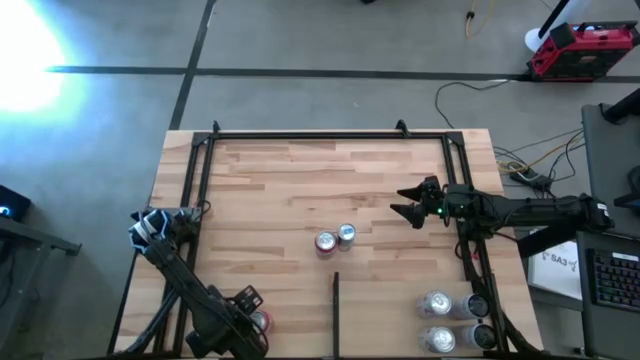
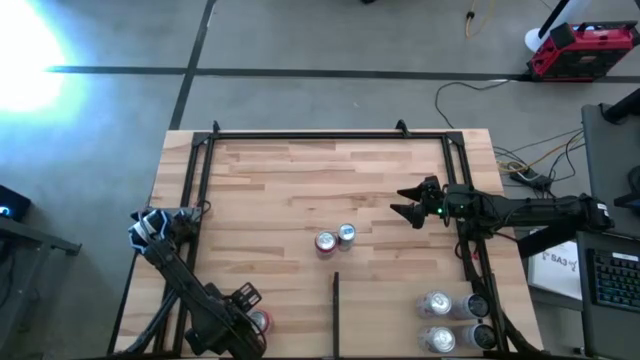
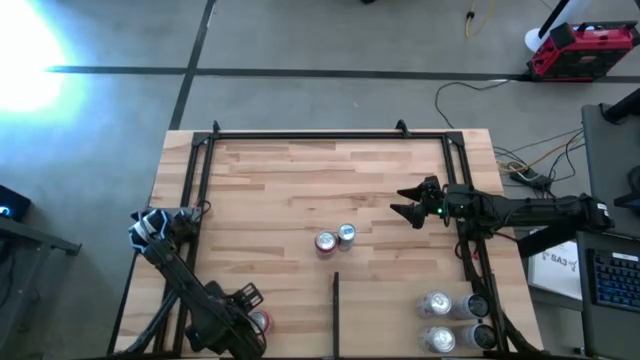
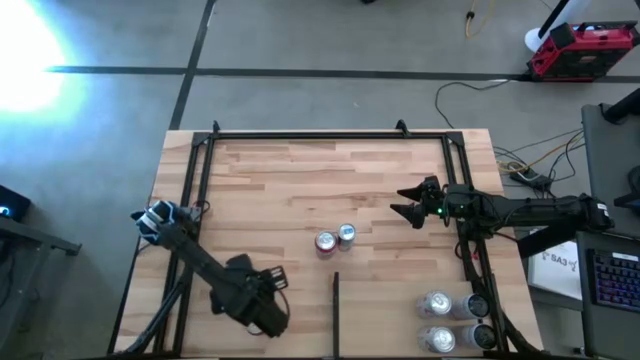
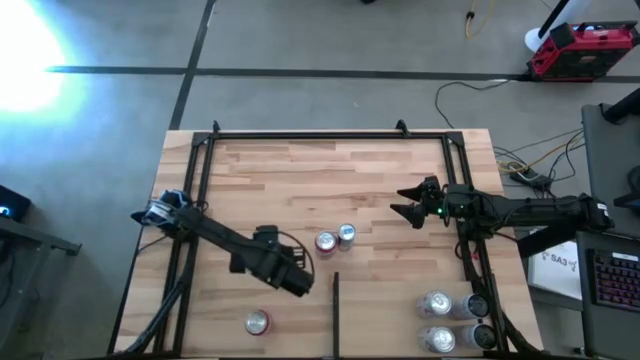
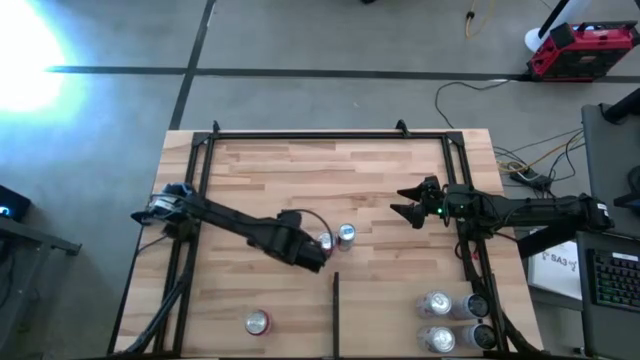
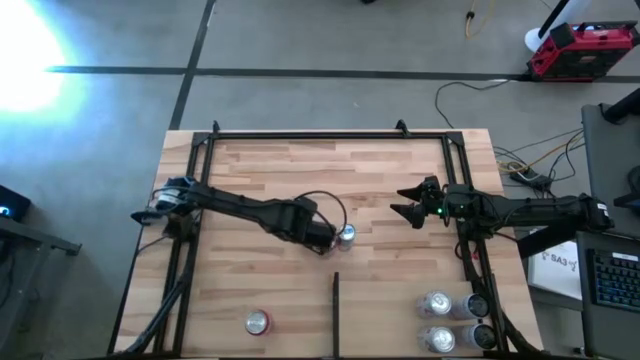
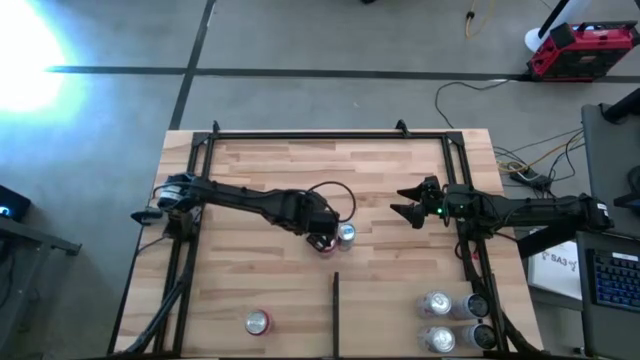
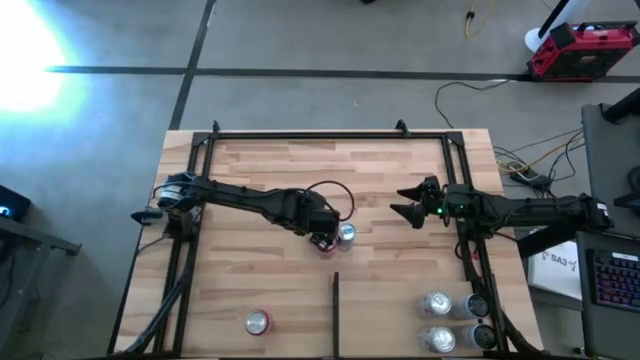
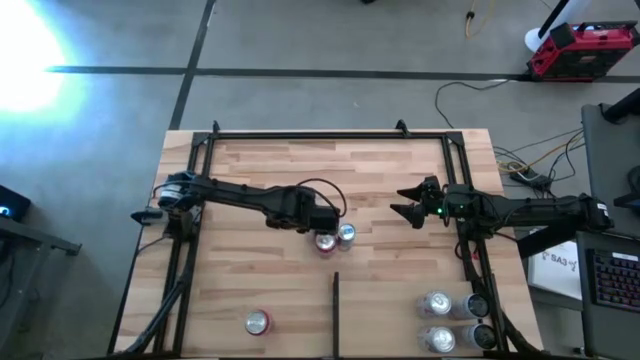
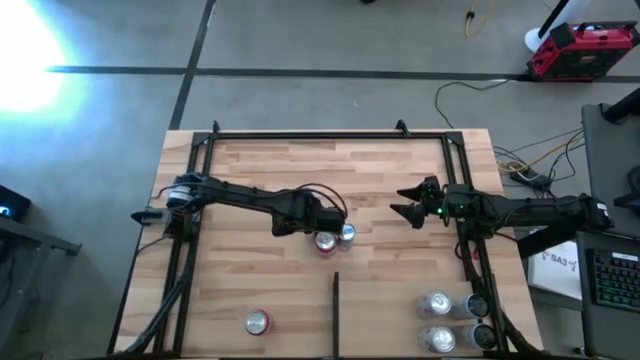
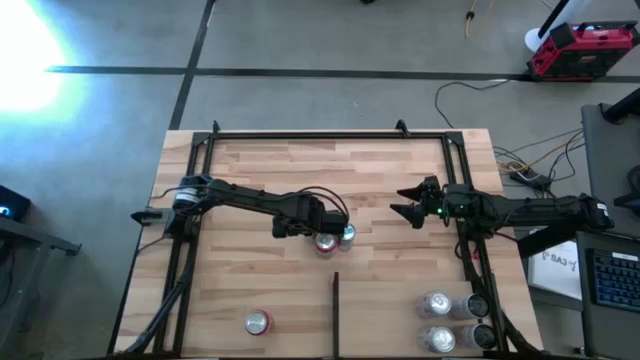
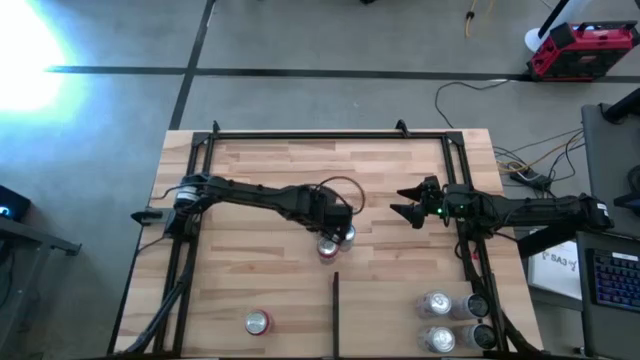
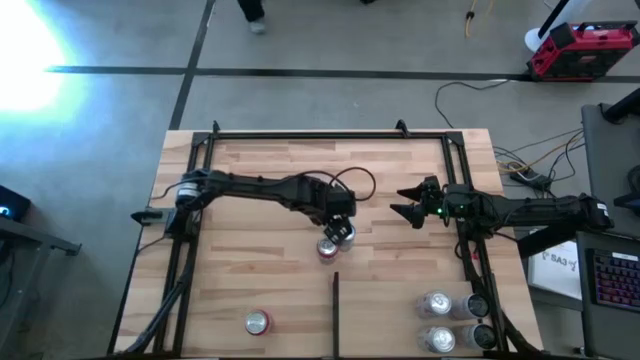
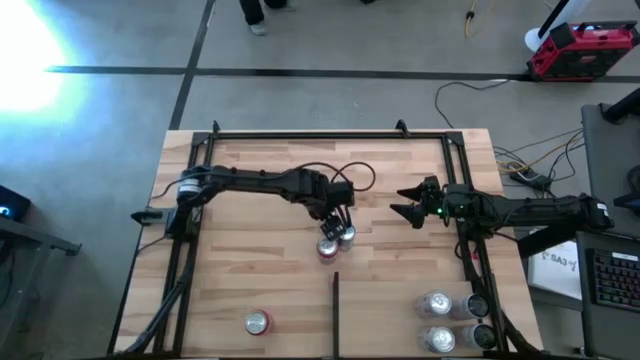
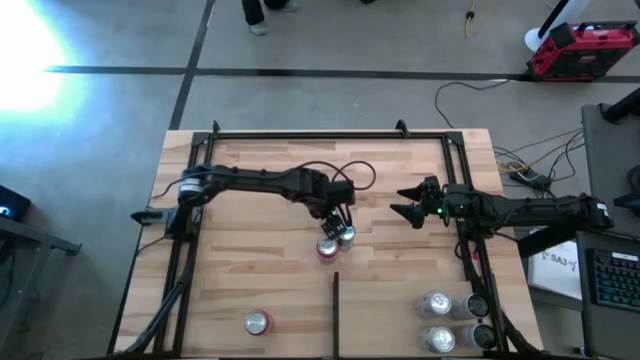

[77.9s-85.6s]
Task: Place canned beverage on shelf
Move the bottom white/blue soda can to the center of the table

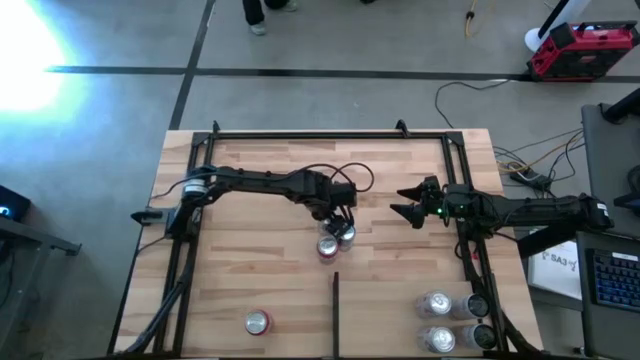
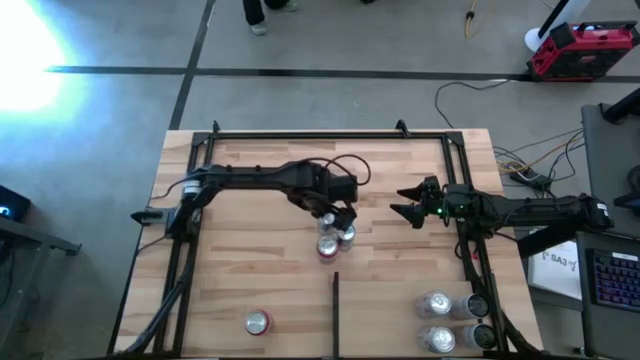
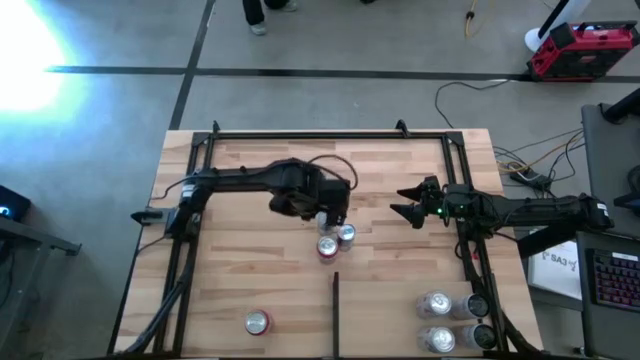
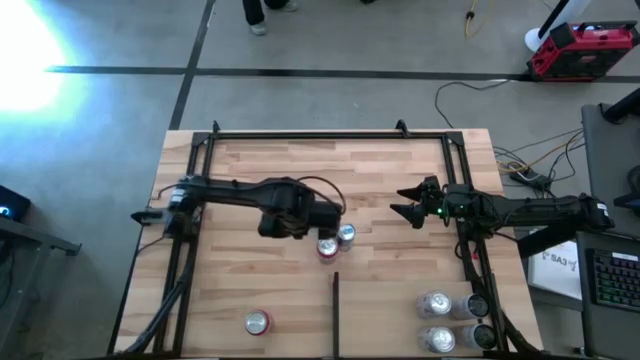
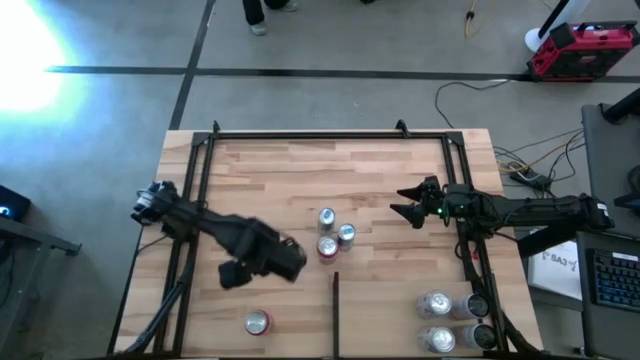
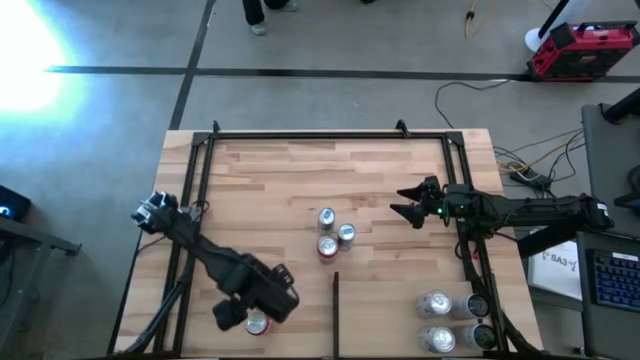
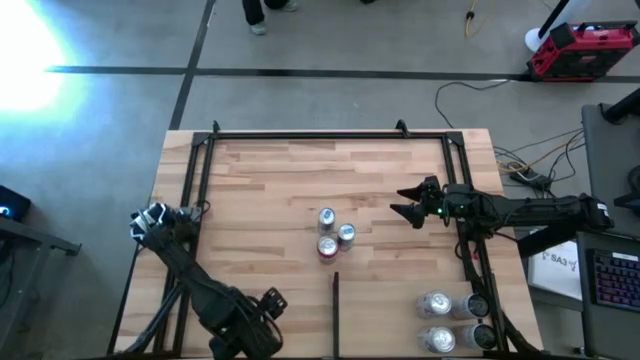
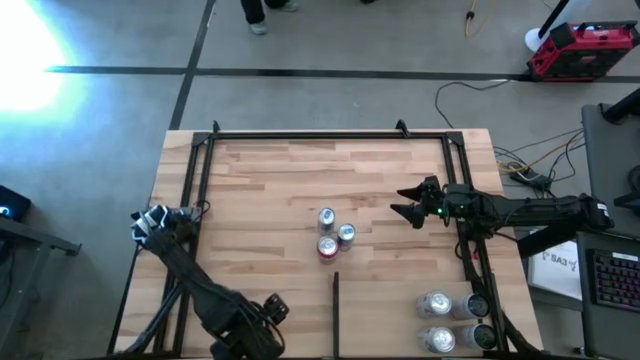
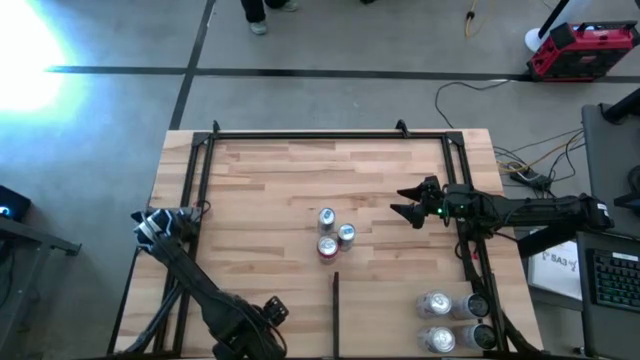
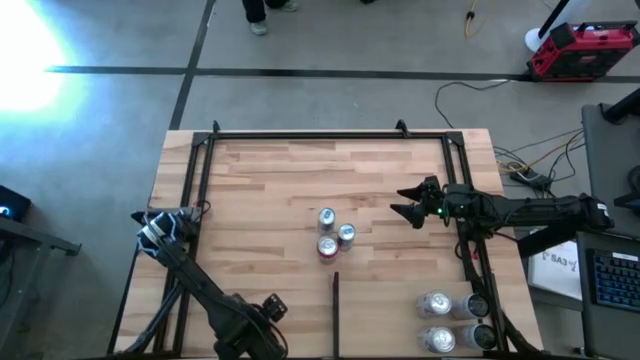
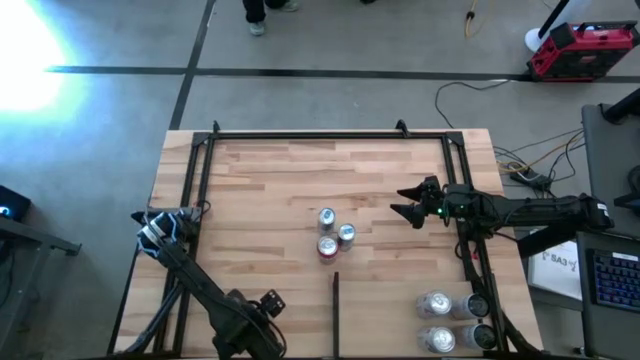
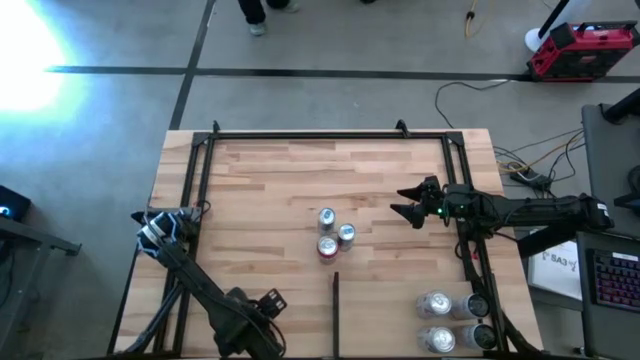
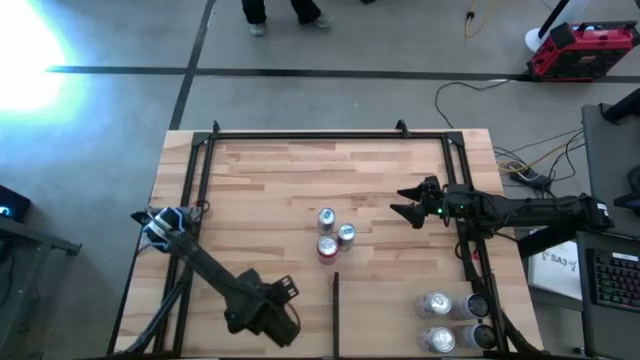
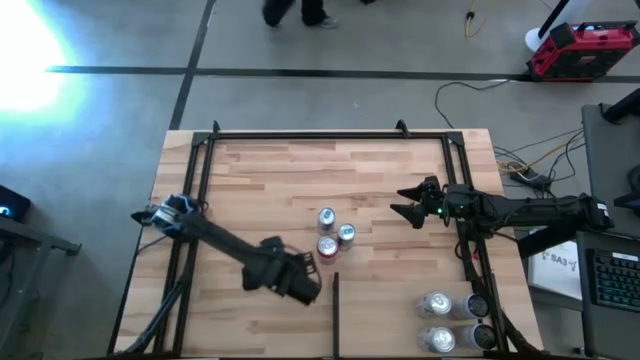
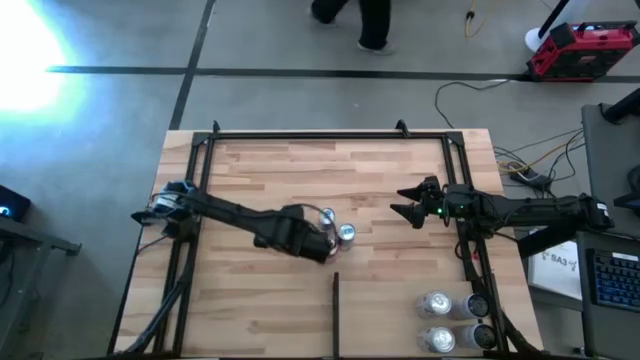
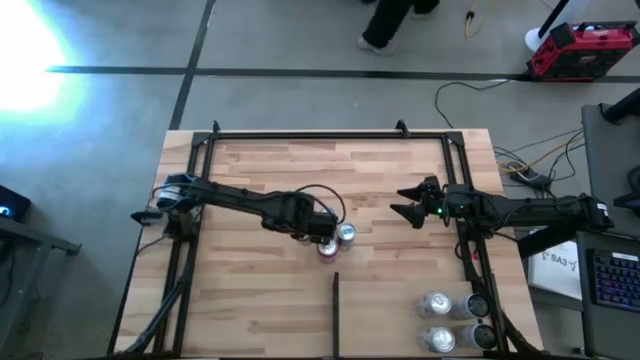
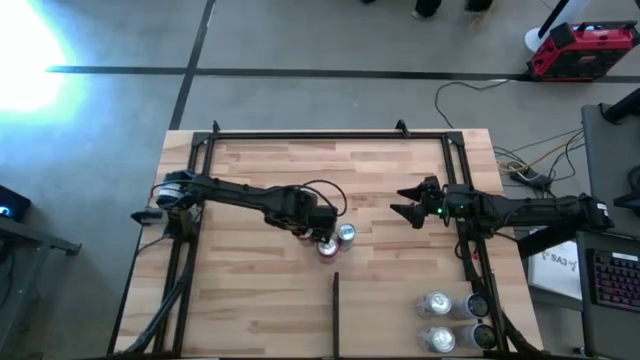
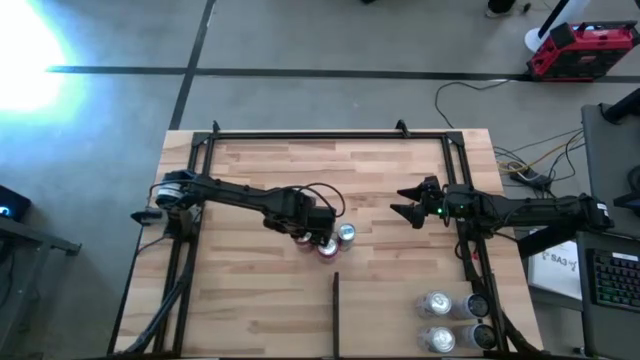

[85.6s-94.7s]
Move the bottom orange soda can to the center of the table

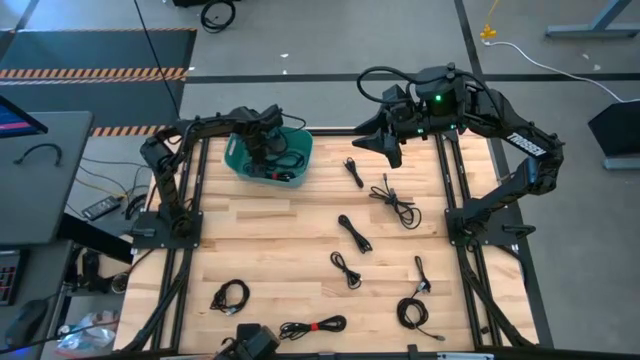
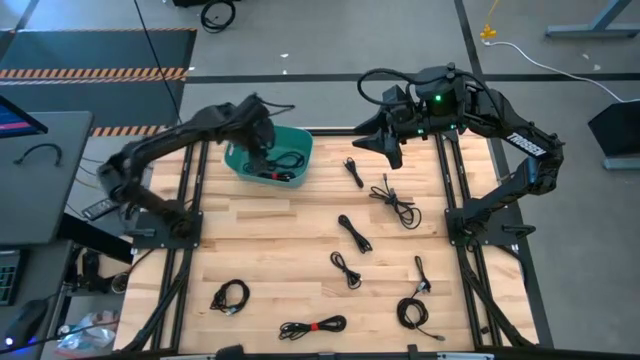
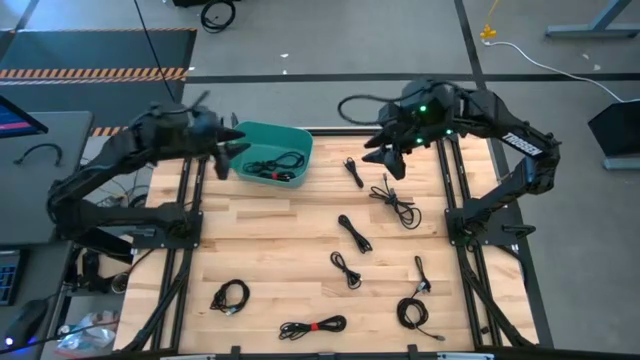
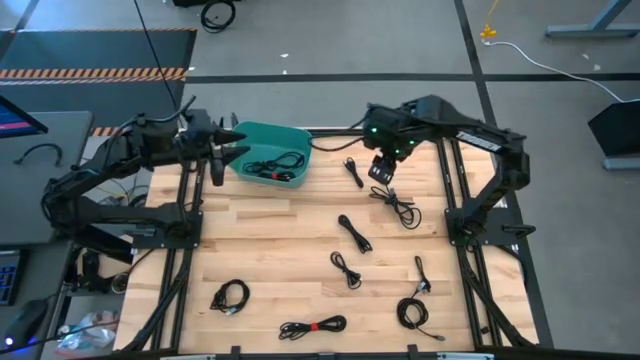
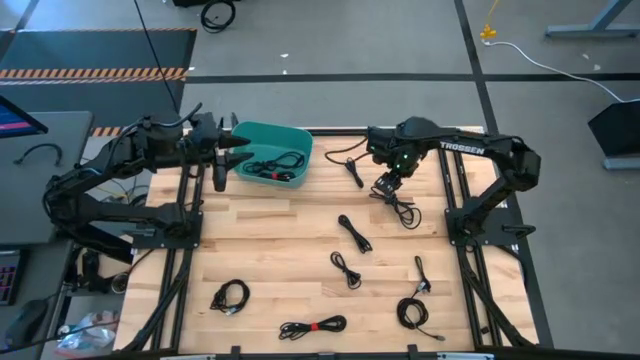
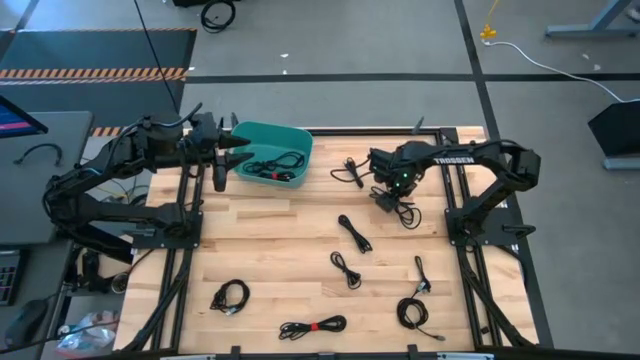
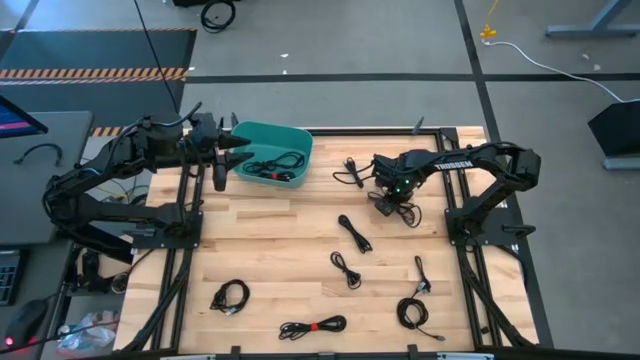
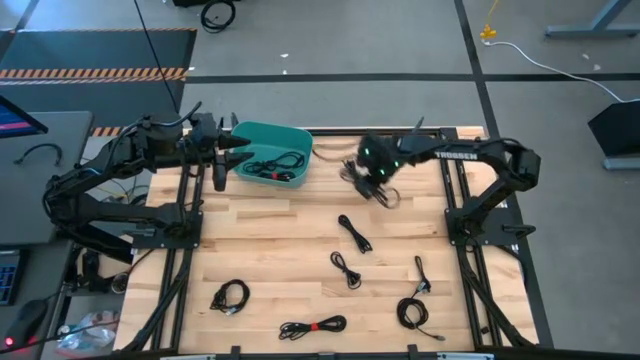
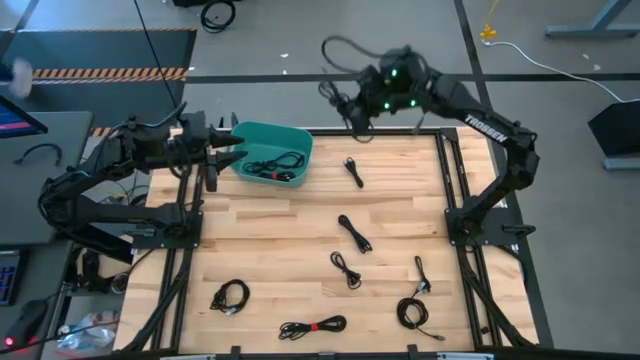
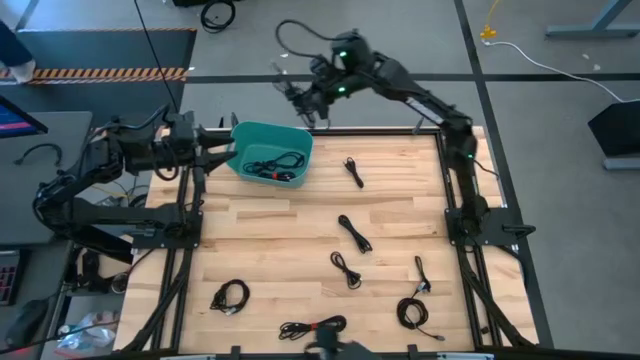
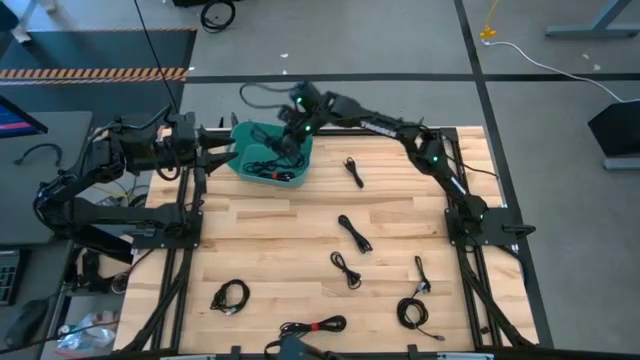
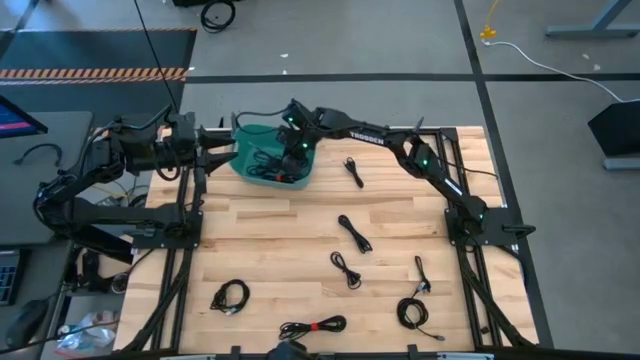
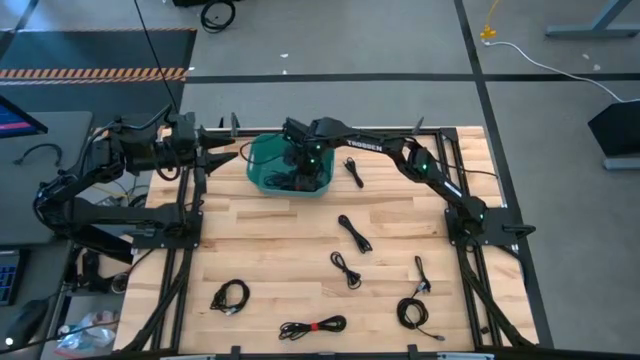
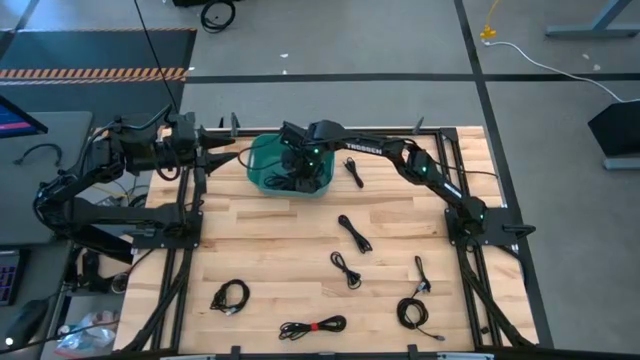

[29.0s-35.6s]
Task: Pick and place USB-C Cables
Put the black charger cable into the green bin
